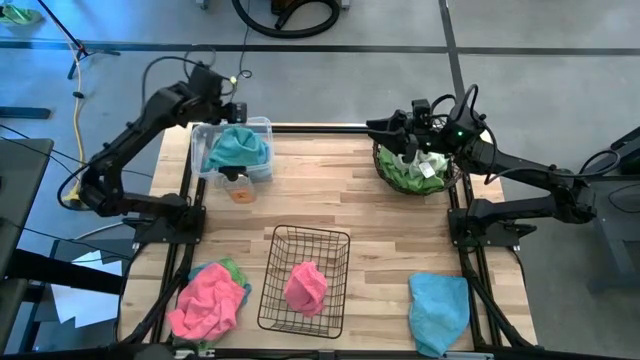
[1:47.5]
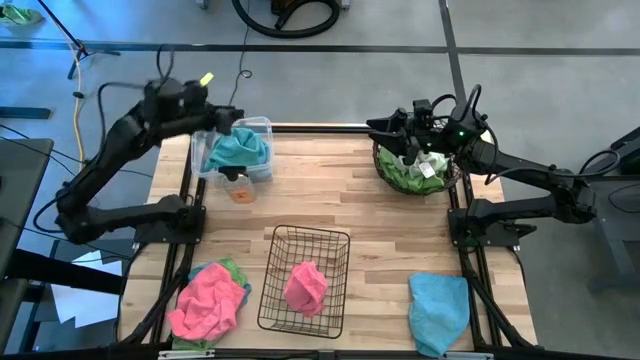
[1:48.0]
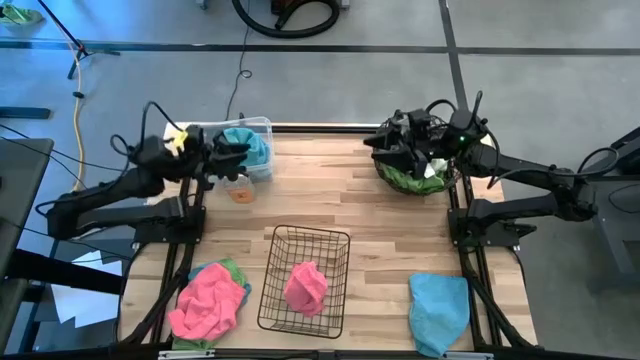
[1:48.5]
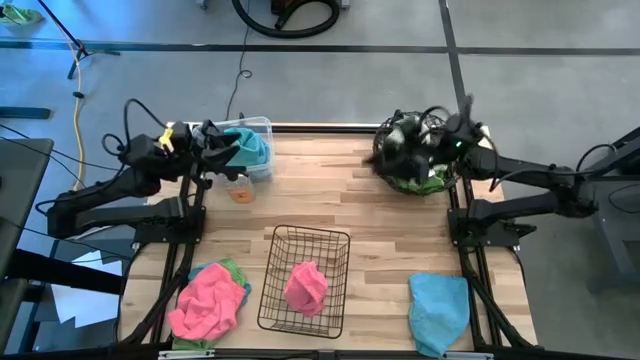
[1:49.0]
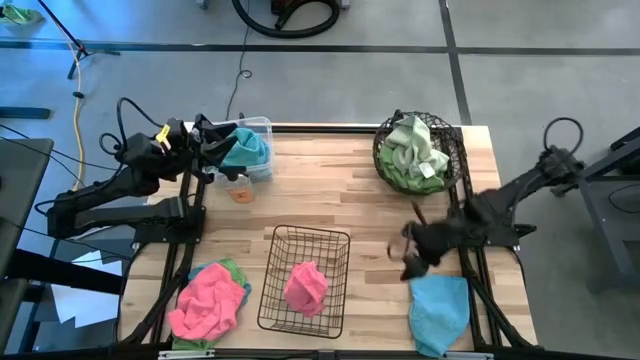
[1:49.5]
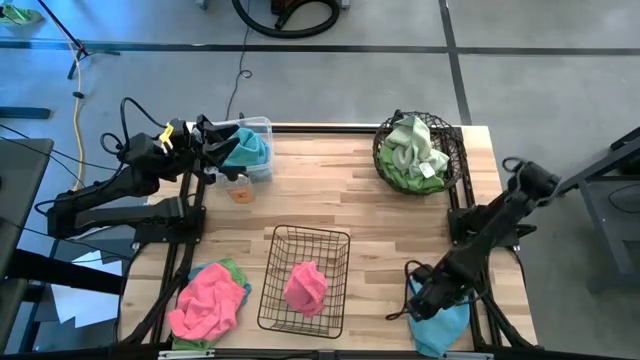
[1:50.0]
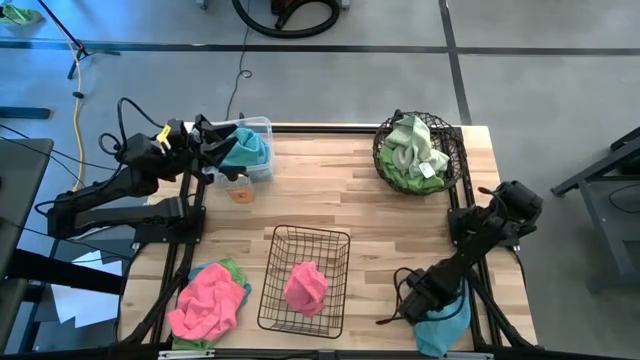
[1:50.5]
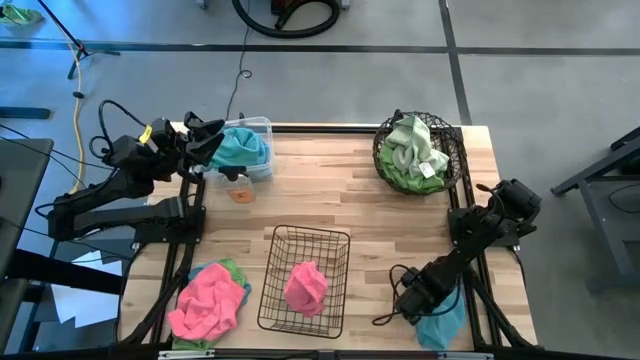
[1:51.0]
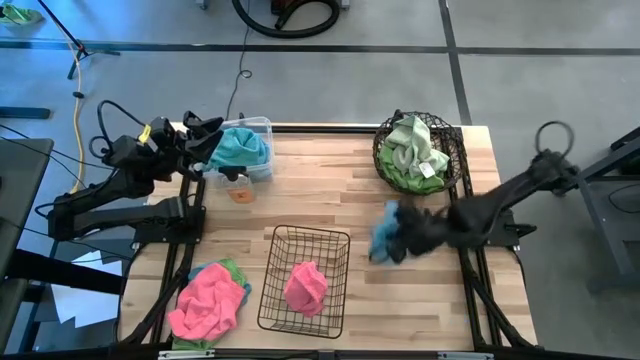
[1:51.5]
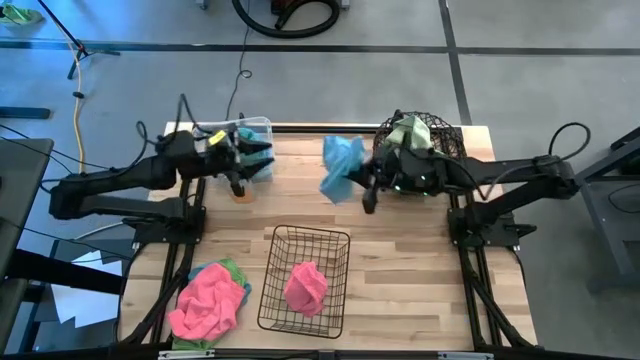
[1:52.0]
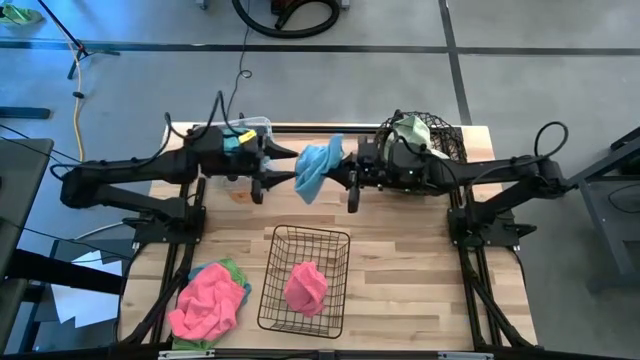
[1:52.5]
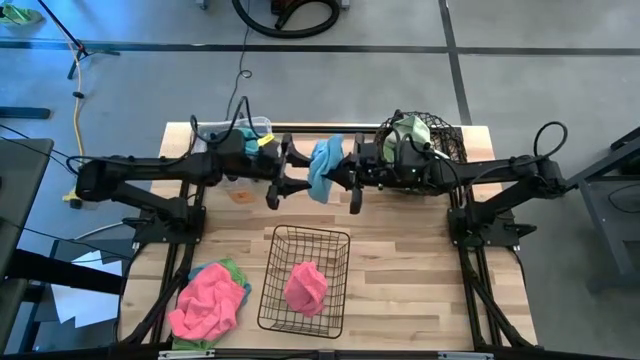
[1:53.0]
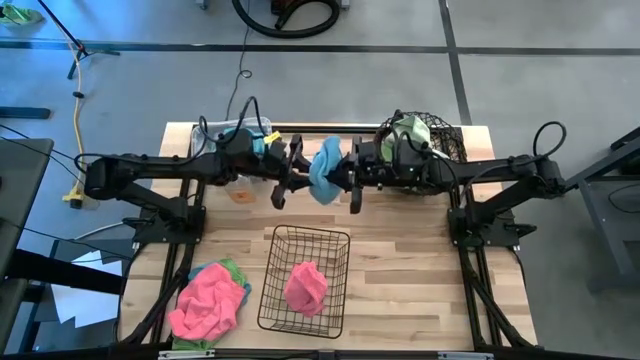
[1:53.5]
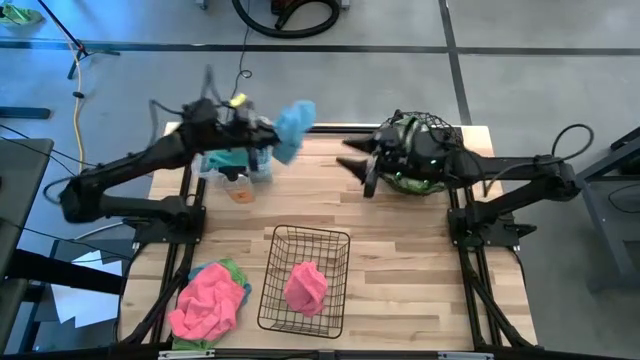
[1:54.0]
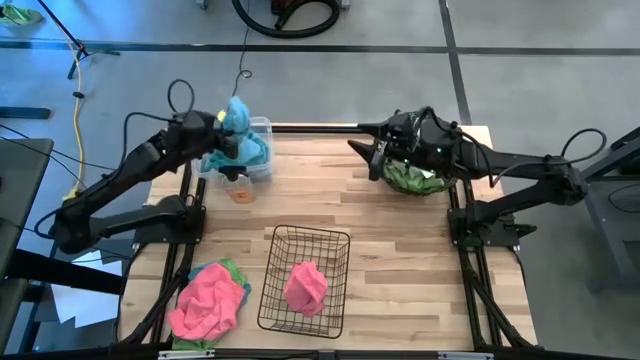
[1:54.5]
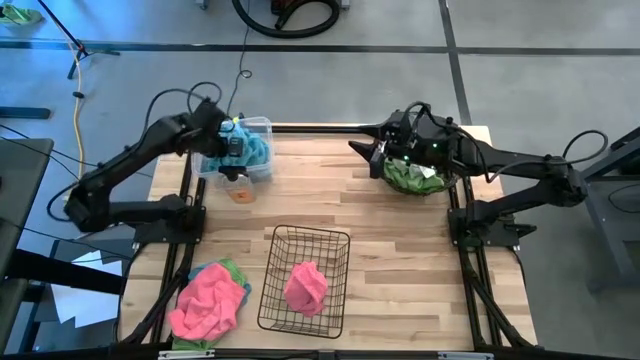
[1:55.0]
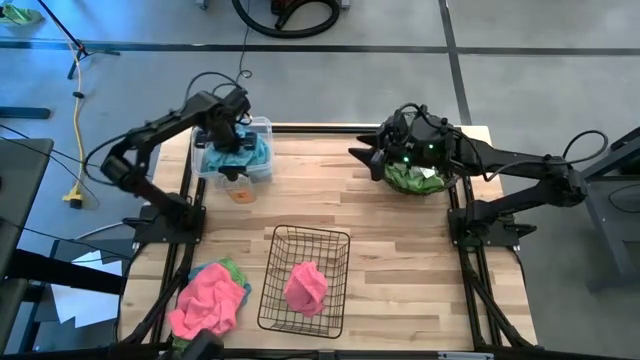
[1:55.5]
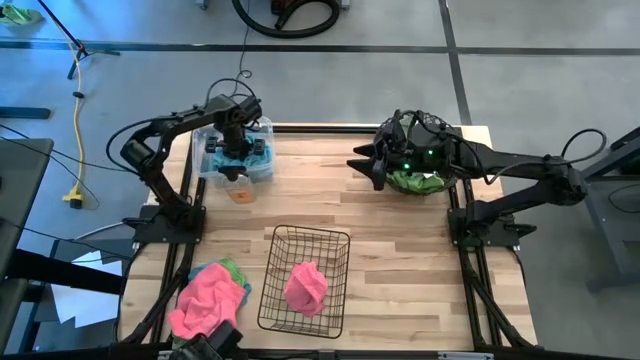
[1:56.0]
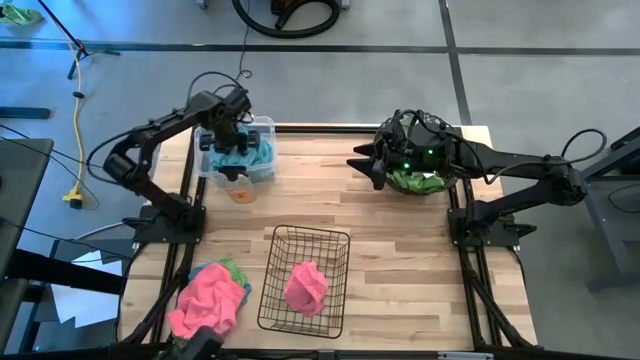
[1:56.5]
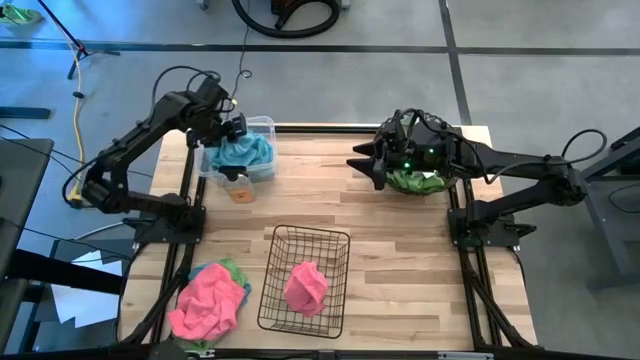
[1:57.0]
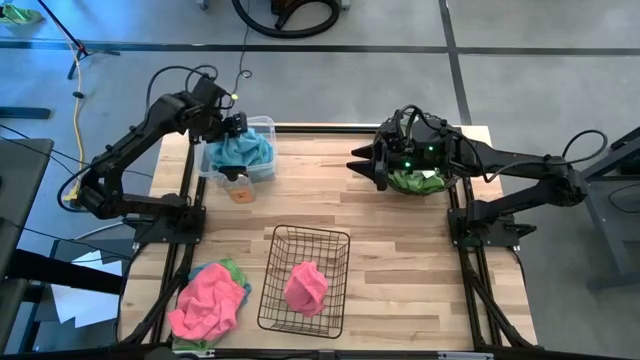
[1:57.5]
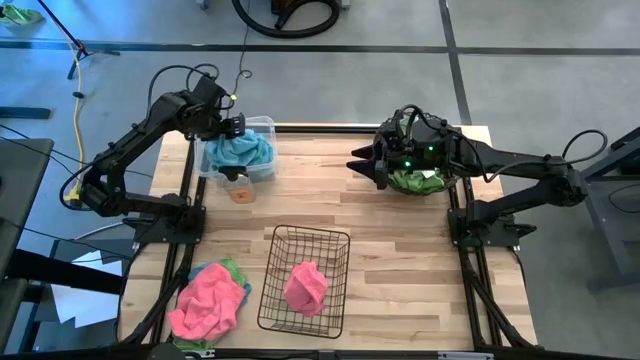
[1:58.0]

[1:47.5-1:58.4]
Task: Sort microfiber towel by color & place in baskets
Put the blue microfiber towel into the transparent bin

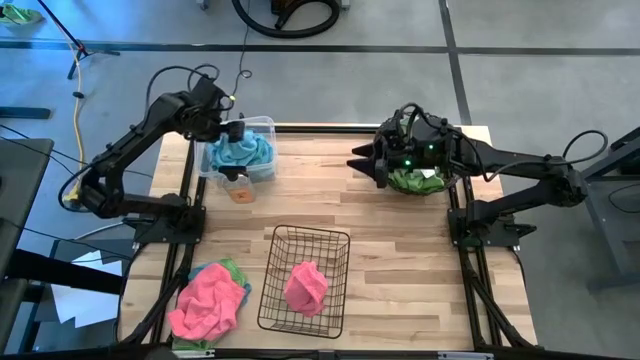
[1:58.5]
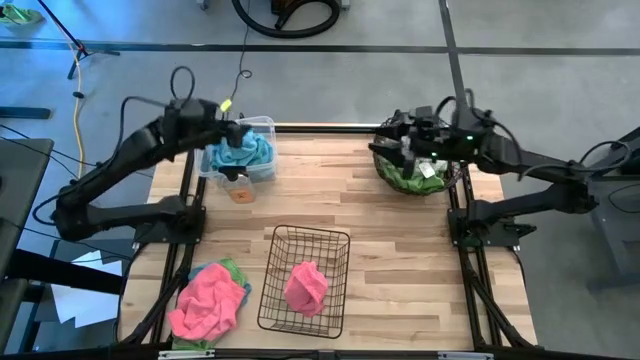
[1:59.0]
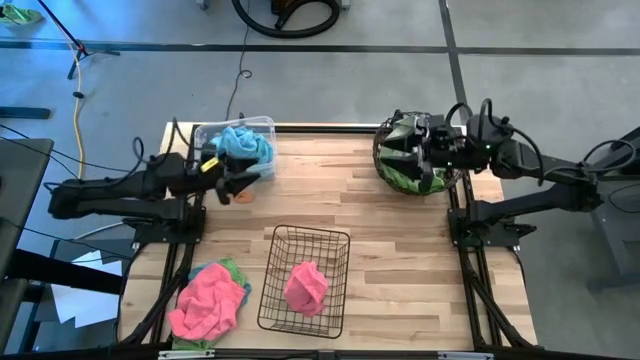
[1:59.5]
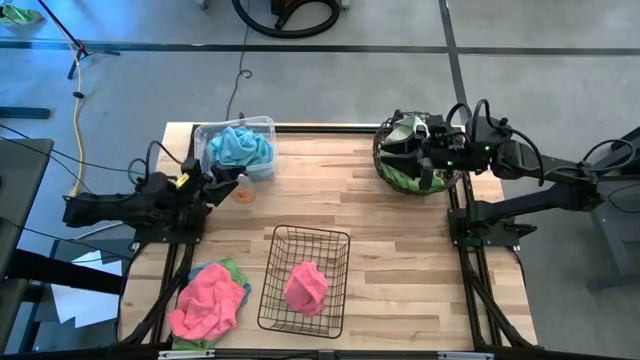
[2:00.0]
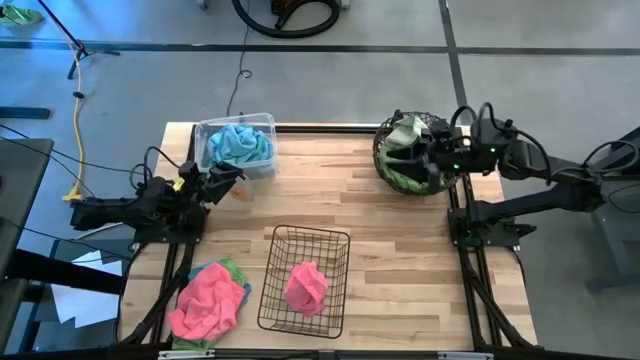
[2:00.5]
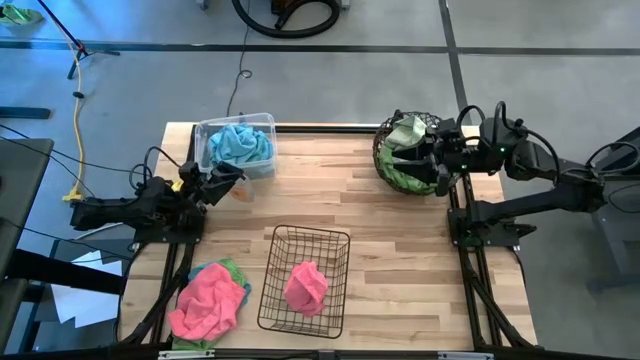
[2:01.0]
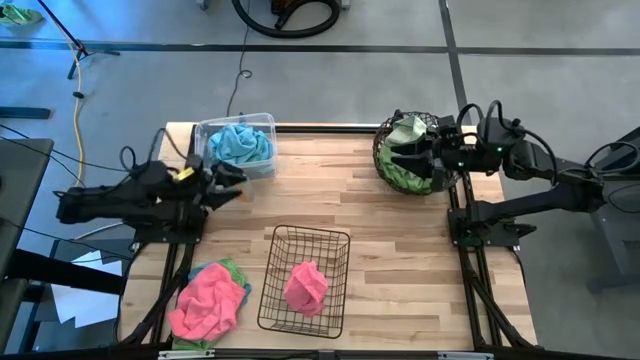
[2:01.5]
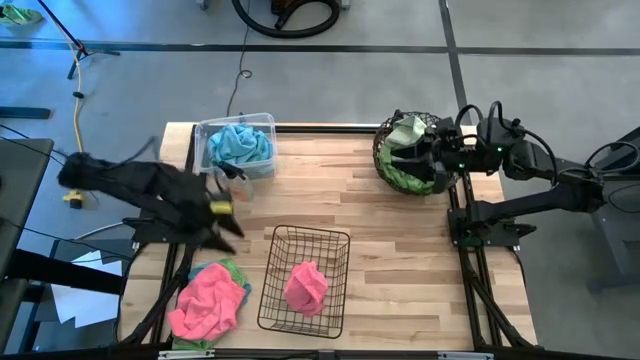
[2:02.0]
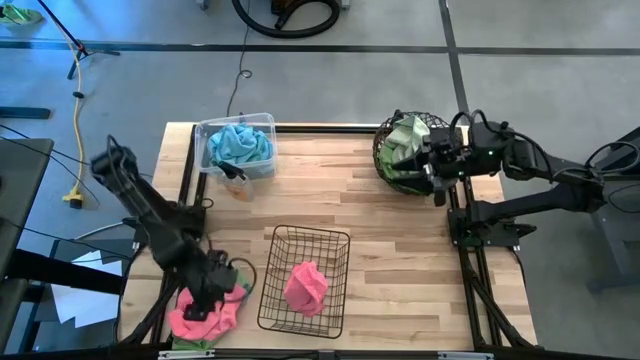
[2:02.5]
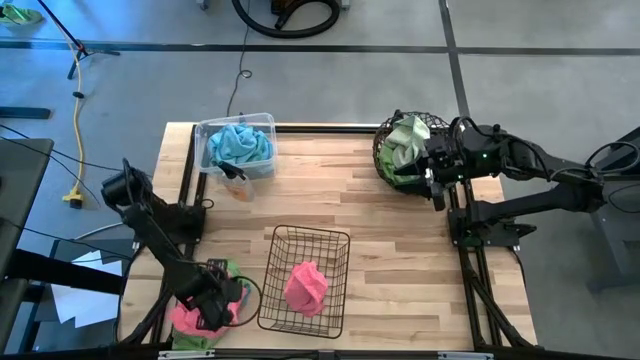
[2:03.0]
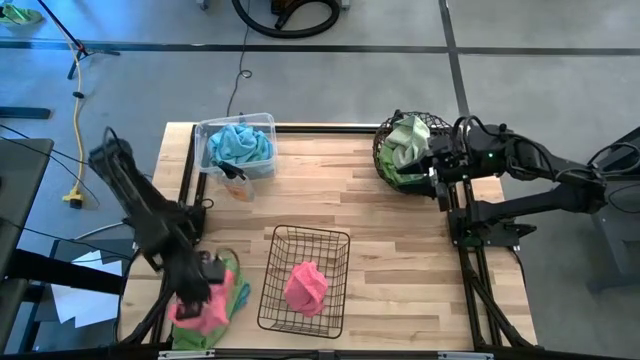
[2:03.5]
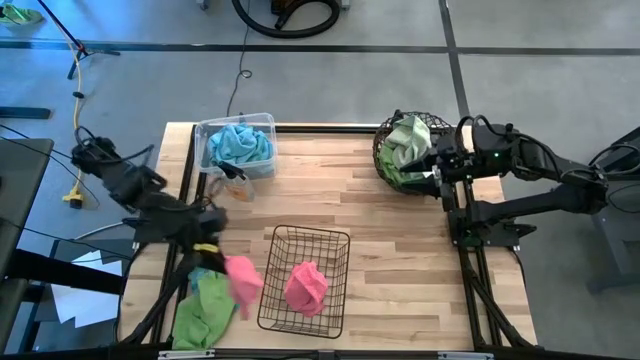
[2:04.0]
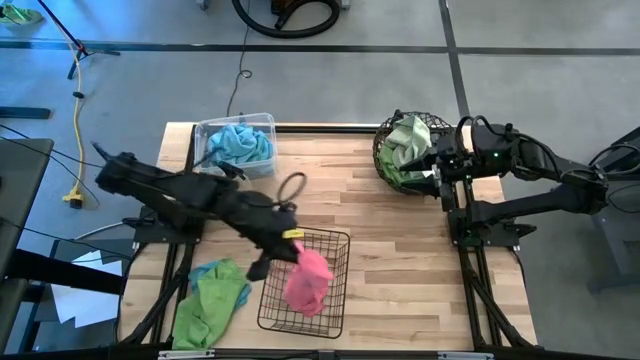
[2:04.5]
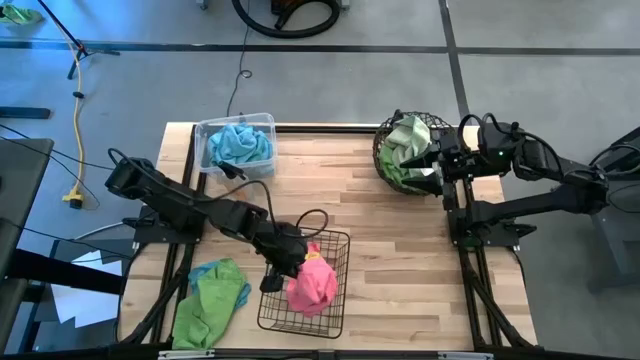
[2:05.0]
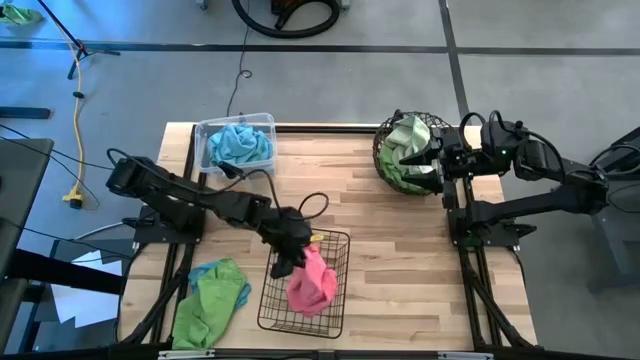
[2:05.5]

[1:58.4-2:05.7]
Put the pink microfiber towel into the black wire basket
